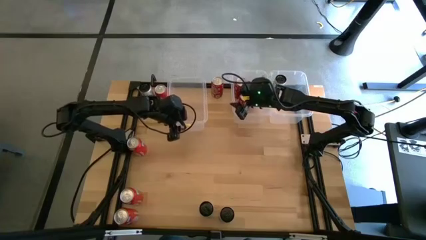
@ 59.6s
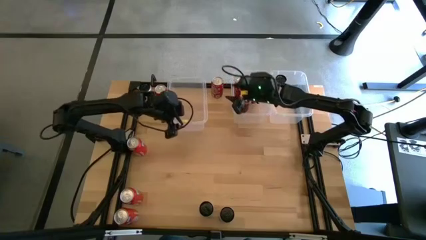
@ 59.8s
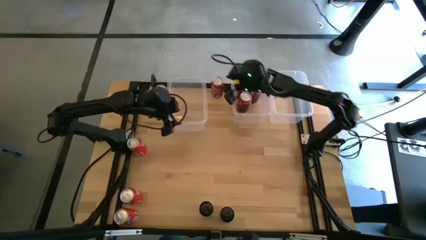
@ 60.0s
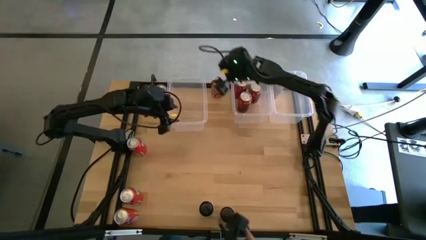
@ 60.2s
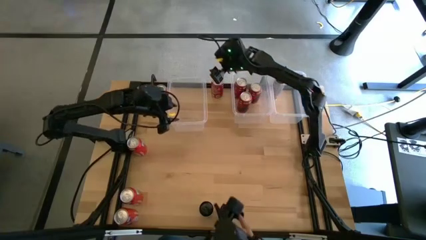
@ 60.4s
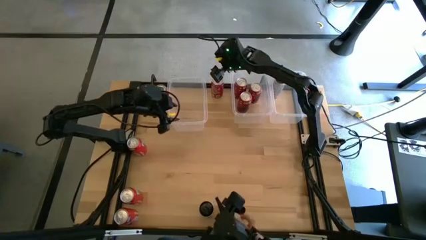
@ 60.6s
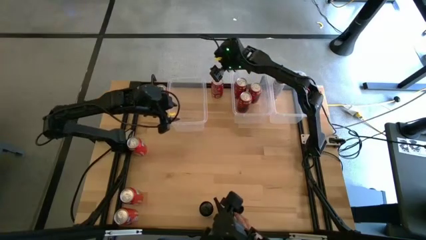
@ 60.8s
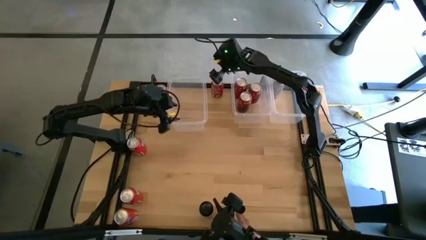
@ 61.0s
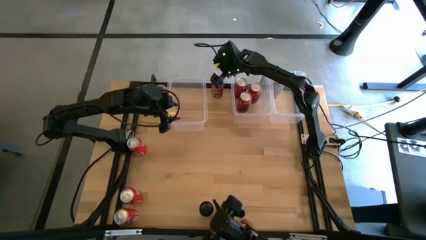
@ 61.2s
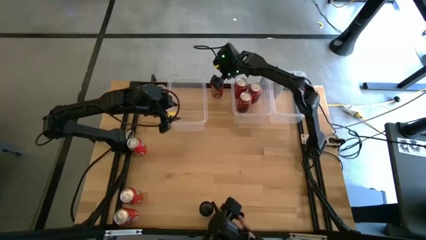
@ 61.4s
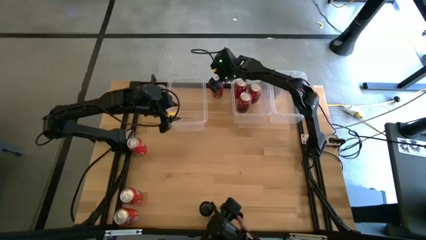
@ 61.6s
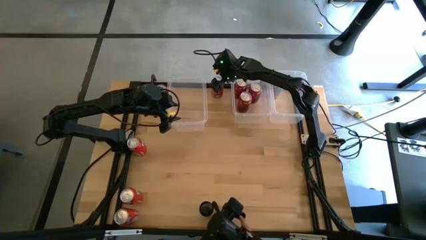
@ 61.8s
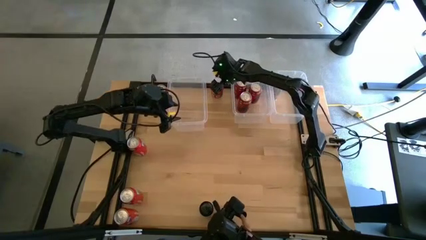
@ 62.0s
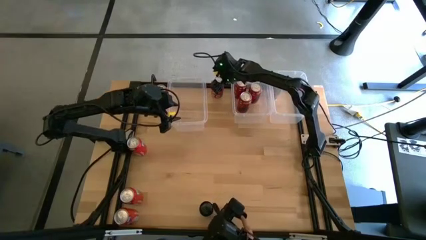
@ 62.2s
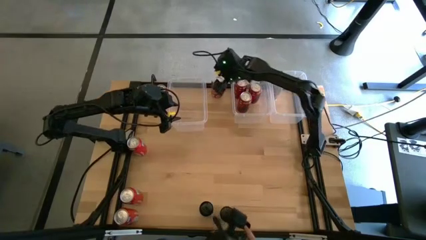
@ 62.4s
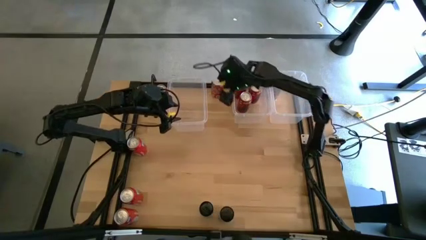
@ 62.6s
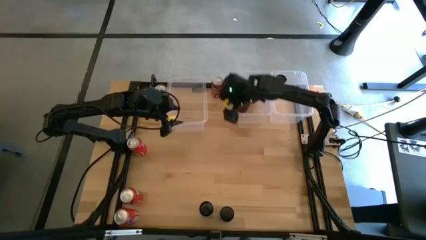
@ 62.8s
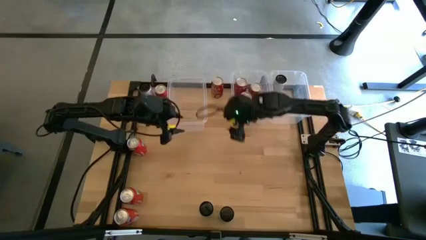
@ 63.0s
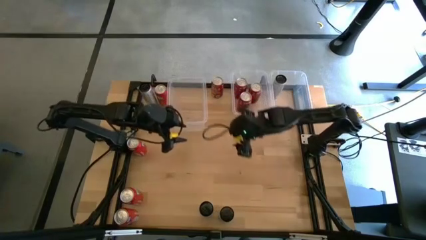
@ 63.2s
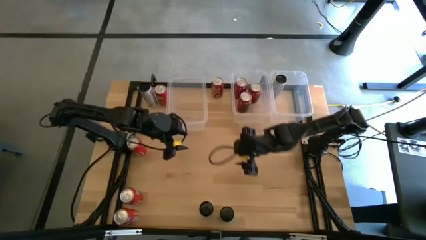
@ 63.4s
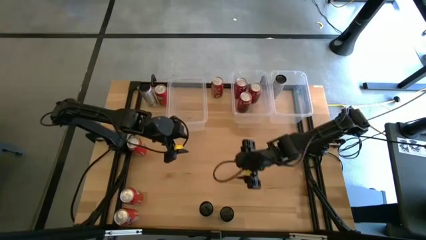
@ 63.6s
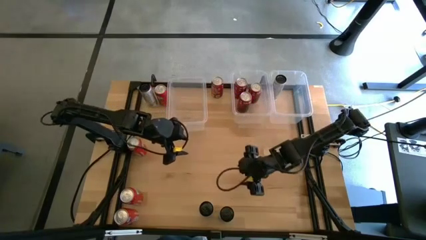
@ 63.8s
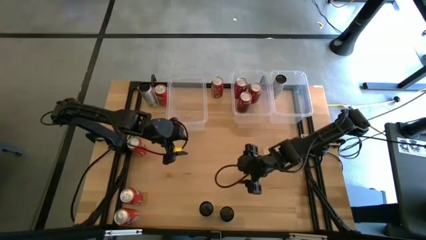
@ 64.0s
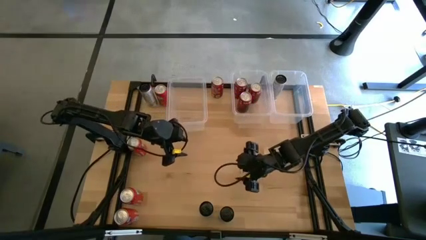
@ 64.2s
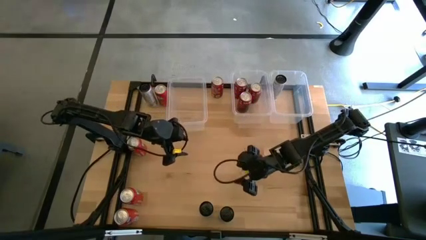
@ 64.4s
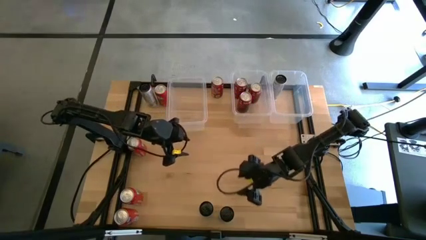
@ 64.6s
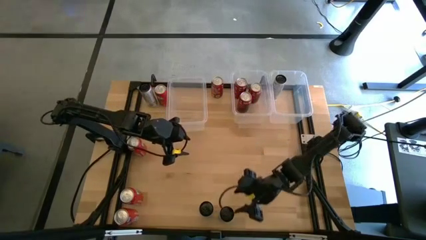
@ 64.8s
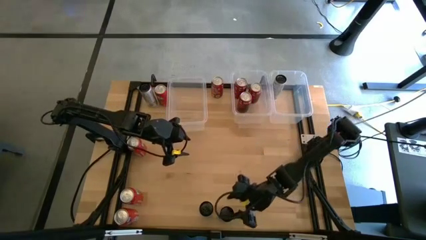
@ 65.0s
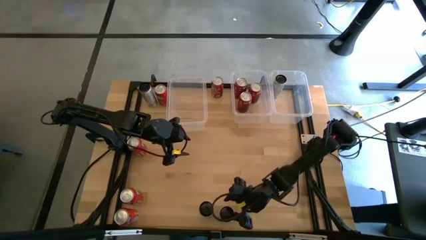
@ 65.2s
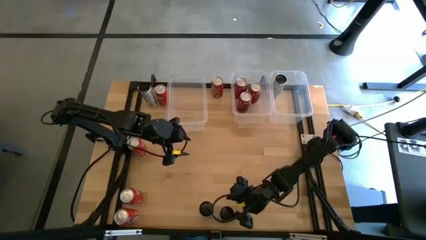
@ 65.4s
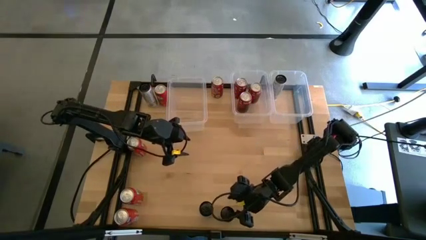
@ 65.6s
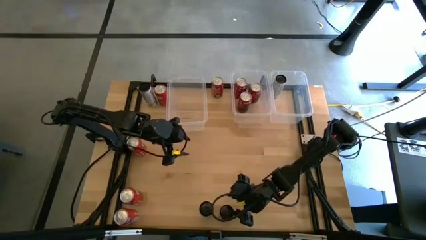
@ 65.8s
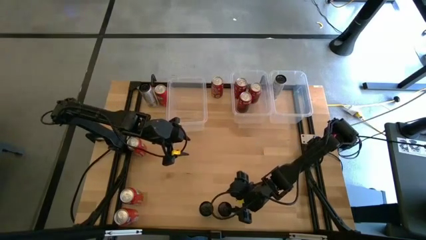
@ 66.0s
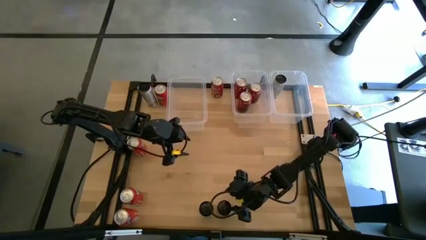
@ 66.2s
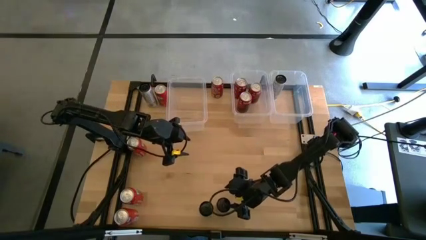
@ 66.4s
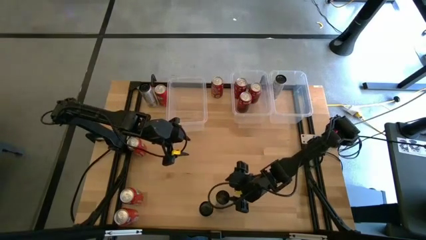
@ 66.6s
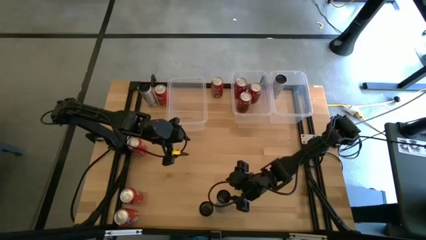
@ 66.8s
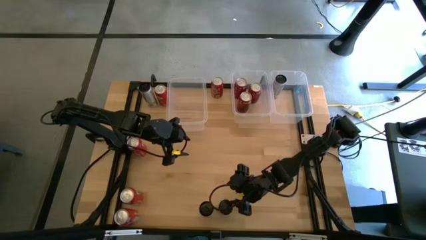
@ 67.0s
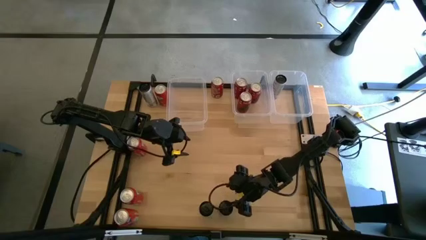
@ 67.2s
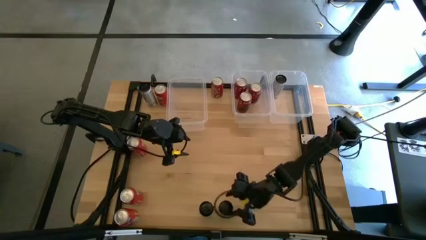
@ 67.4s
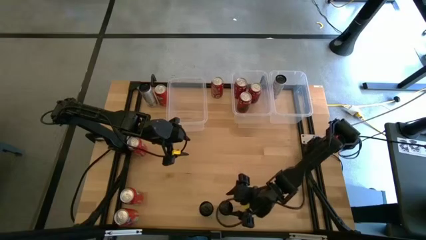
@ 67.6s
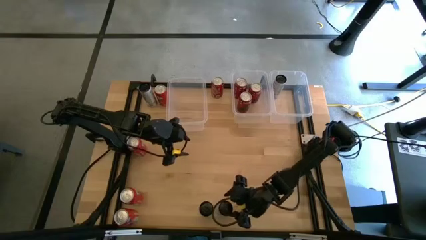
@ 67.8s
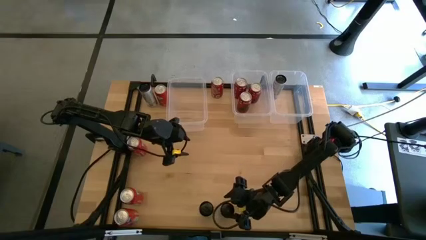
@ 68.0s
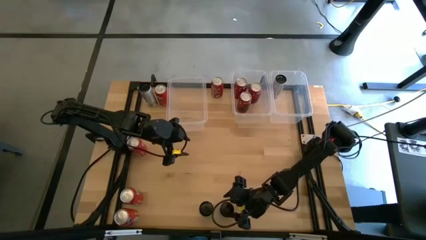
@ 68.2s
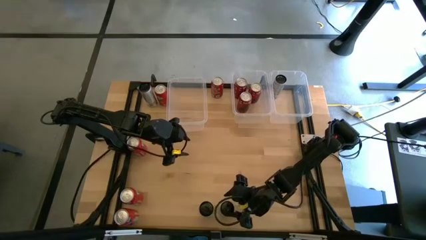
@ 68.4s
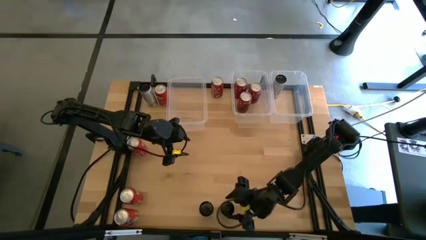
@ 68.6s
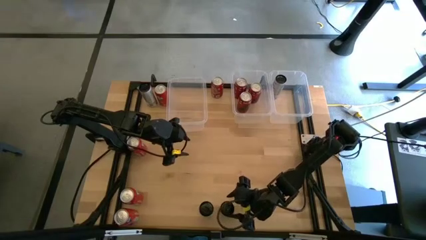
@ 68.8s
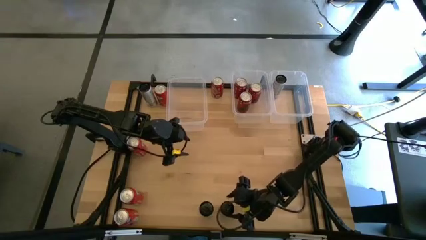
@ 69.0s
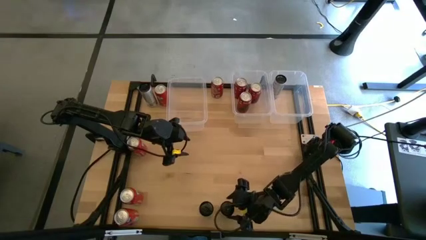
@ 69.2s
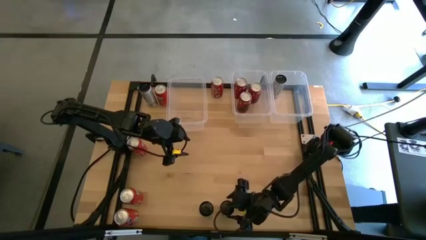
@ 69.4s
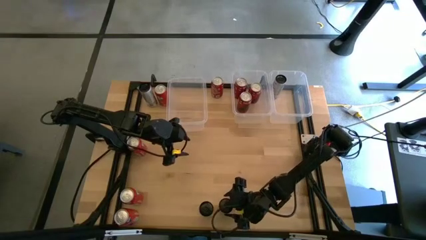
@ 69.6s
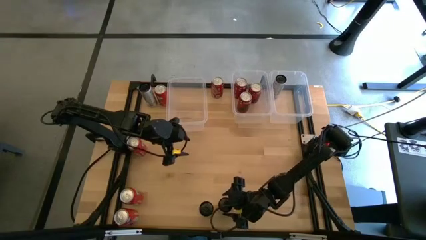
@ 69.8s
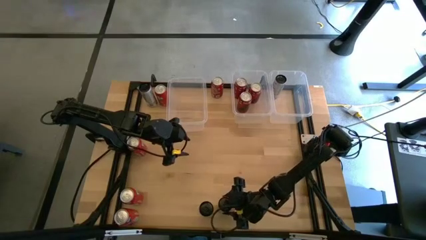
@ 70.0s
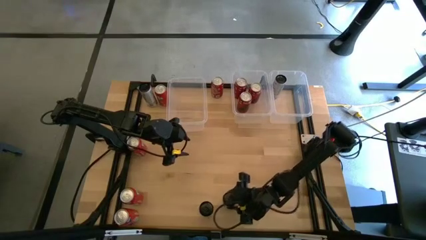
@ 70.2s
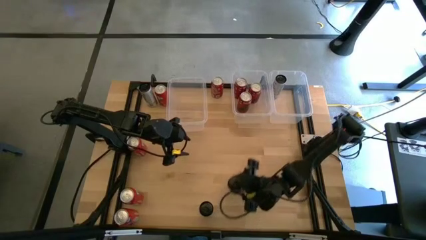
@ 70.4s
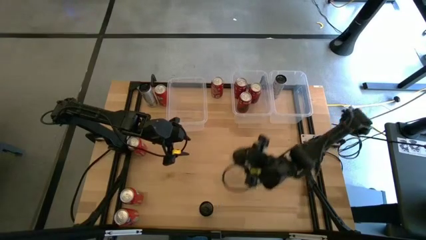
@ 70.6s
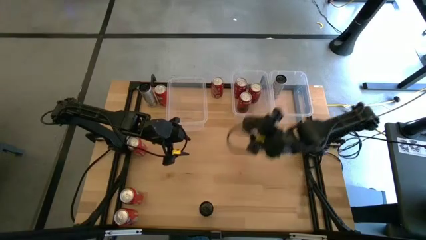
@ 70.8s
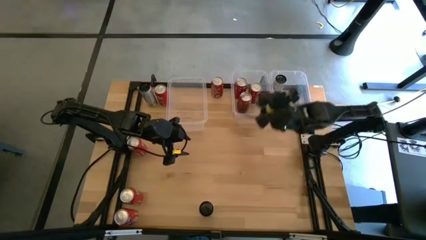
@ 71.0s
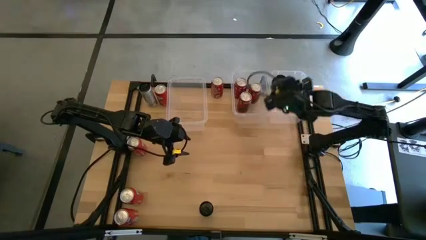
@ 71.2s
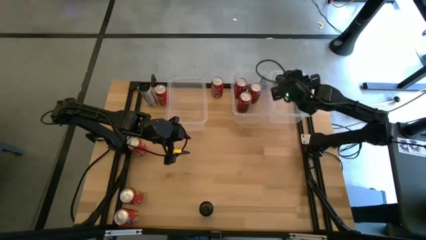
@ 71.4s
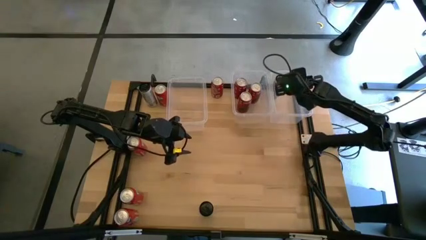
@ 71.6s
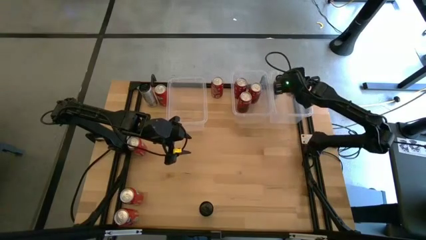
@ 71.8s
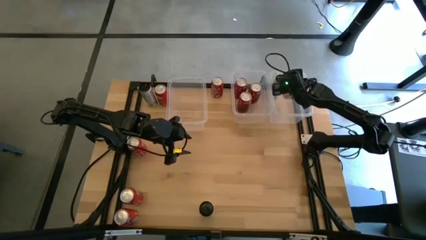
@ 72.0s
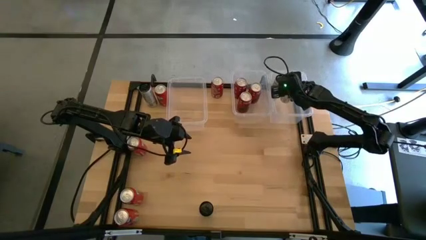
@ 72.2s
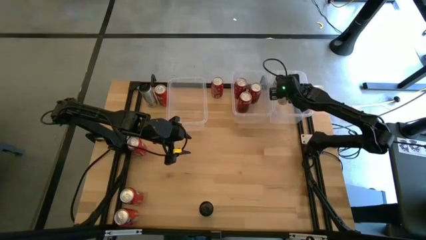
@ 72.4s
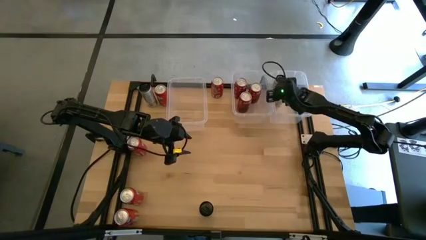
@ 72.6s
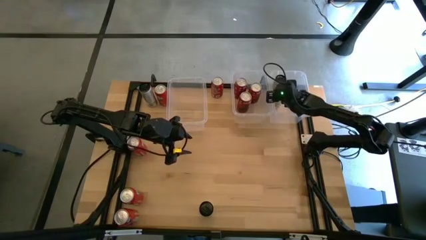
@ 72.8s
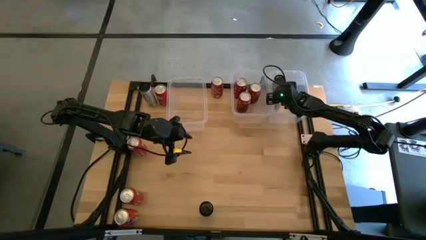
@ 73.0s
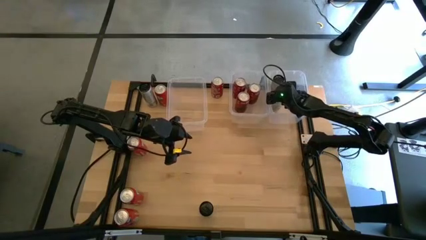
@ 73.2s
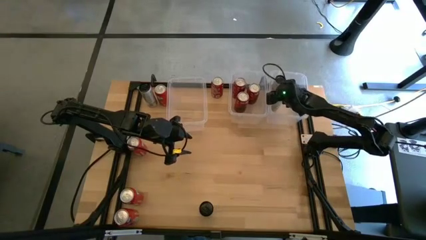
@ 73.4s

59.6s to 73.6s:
Task: Sort soda cans
Put the bottom right white and yellow soda can into the right transparent bin
